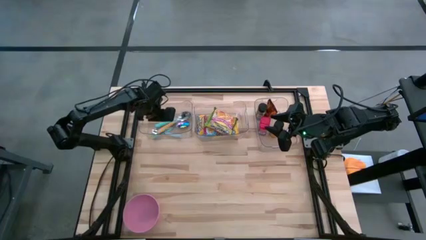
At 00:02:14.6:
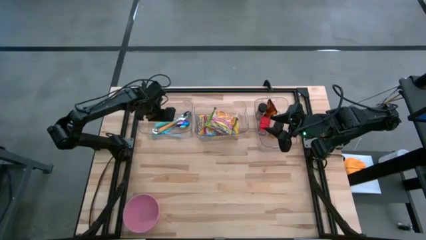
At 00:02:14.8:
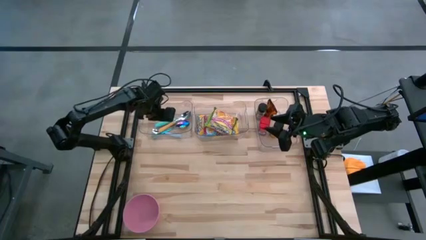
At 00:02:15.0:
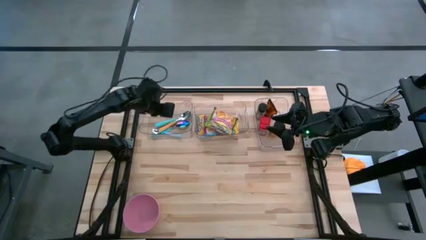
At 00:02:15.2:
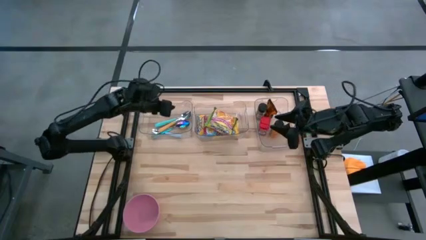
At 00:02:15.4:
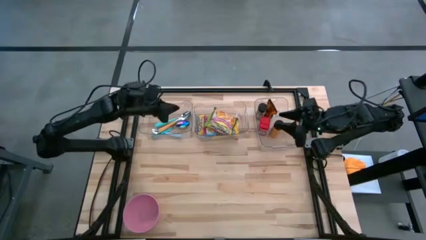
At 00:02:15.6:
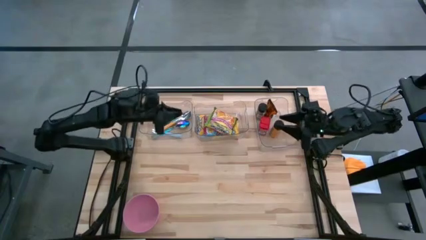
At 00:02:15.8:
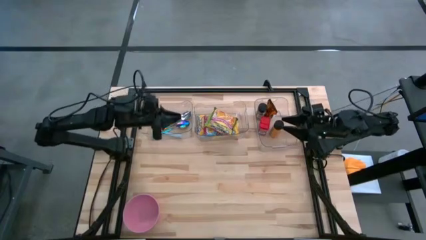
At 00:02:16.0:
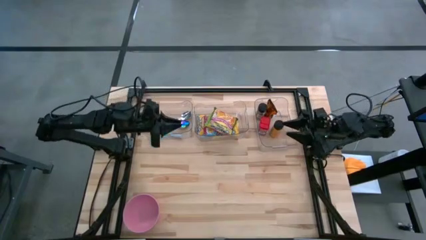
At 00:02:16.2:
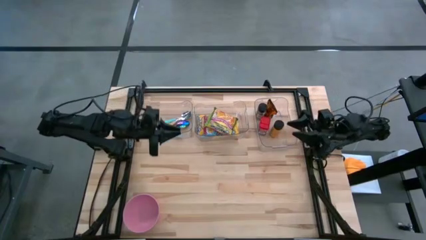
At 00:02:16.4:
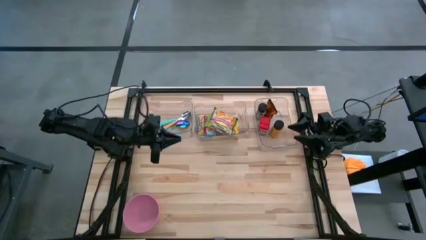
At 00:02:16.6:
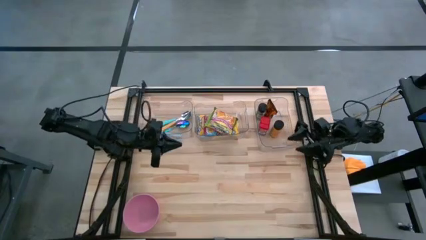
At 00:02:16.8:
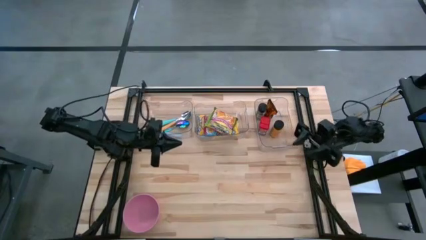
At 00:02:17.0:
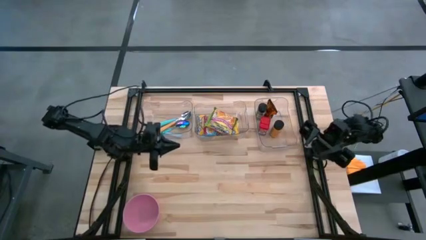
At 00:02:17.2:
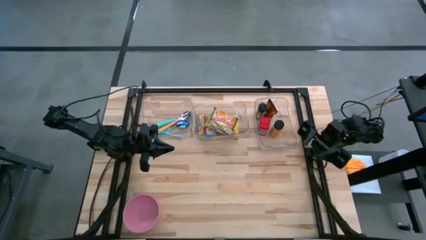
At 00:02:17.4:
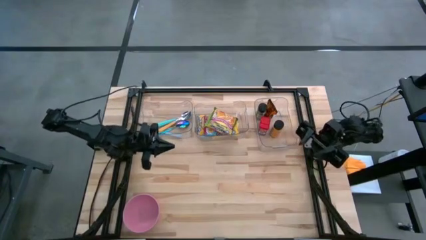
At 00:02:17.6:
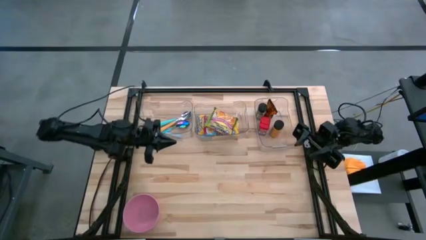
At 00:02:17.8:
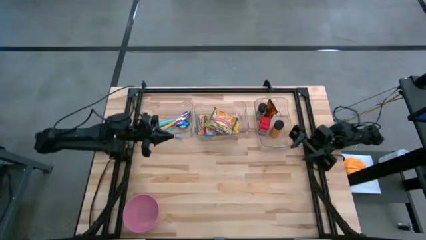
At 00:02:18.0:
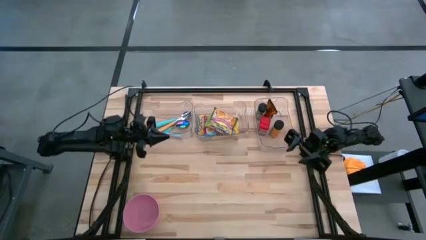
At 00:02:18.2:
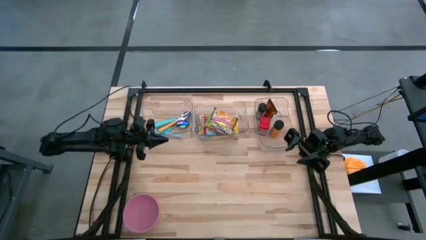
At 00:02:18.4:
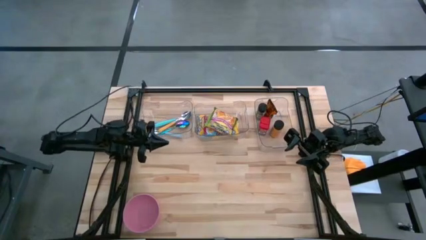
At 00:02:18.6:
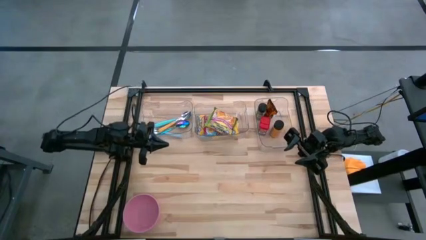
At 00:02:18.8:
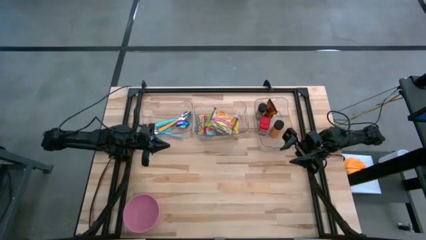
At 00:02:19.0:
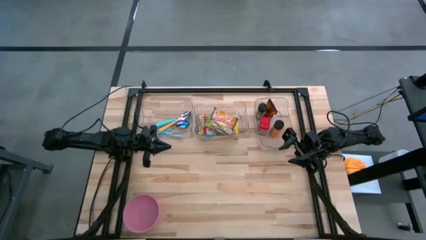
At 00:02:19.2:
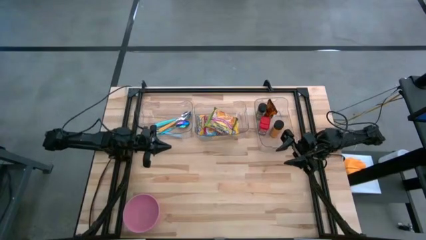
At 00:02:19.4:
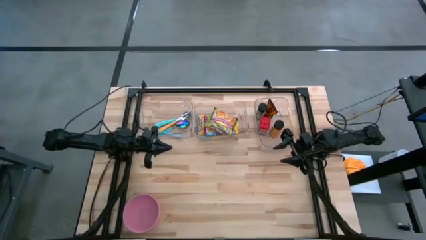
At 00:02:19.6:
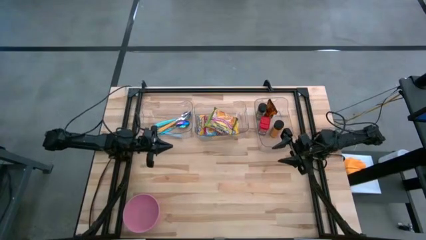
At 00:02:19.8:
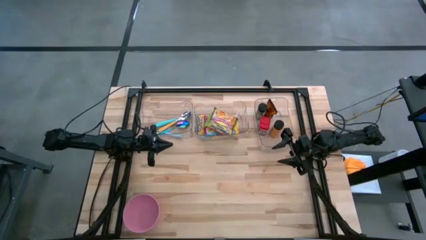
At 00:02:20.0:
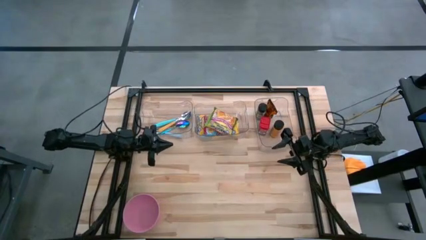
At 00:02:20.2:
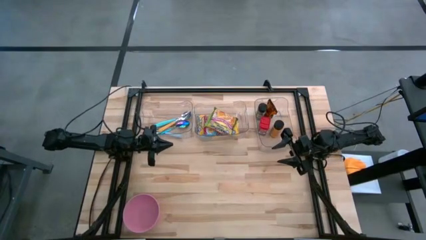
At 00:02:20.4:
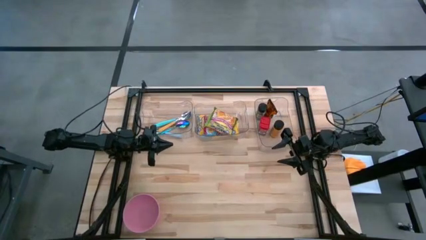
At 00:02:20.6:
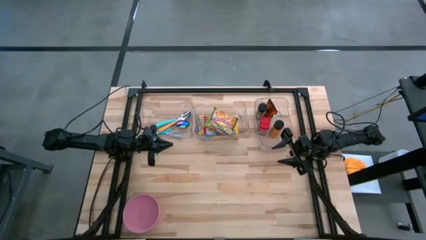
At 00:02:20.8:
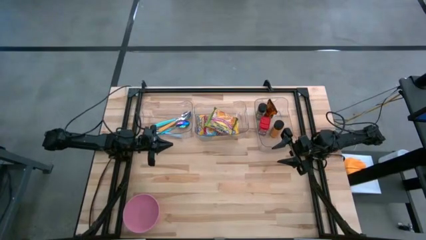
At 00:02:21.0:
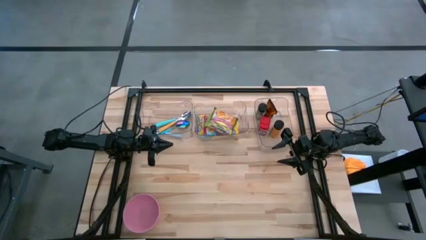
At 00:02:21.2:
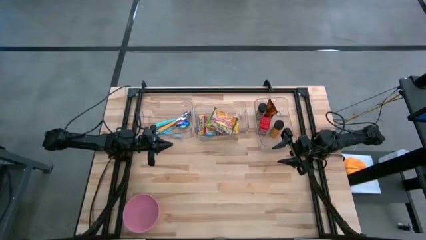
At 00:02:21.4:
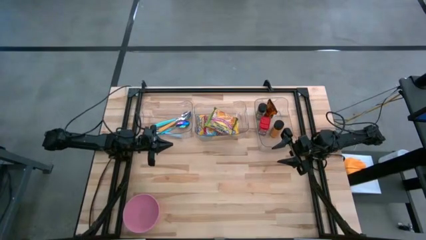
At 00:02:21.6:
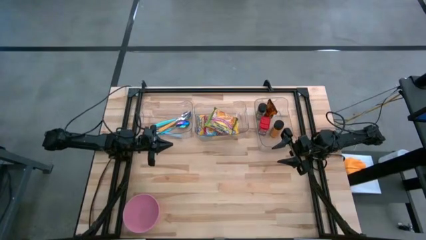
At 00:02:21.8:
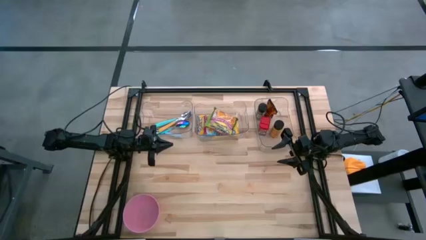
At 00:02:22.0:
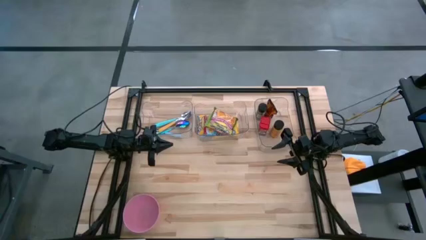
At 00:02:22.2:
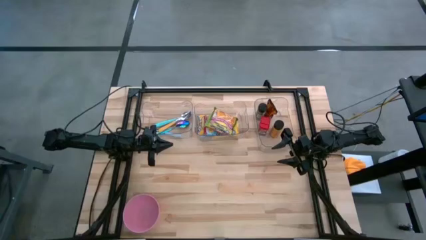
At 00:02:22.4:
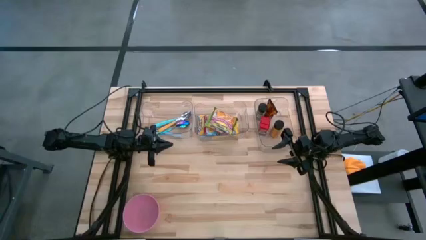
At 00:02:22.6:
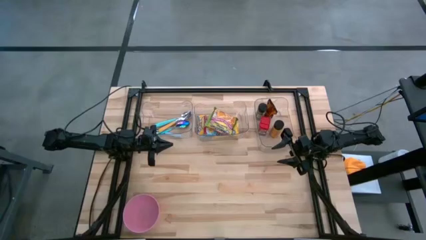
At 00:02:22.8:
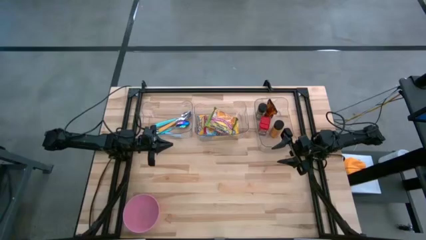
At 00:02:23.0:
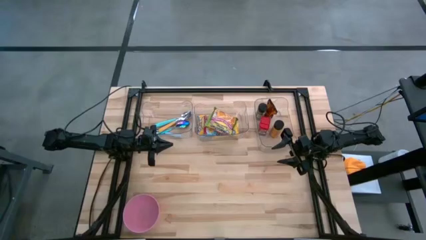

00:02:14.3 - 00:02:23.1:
Return to Home Position
